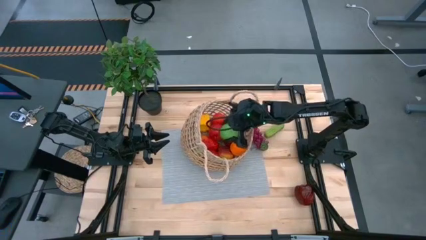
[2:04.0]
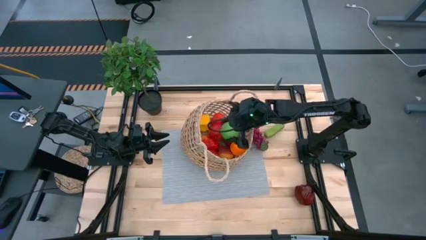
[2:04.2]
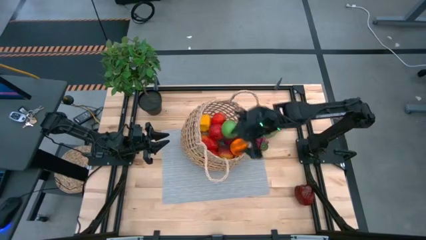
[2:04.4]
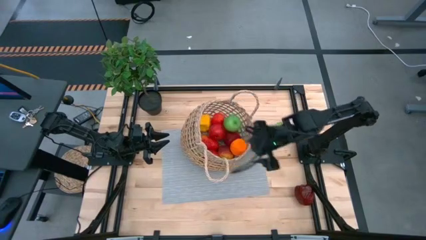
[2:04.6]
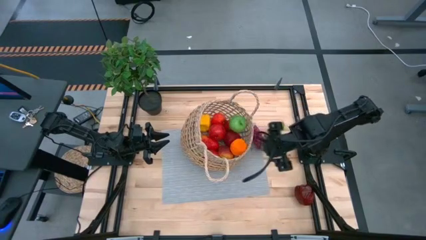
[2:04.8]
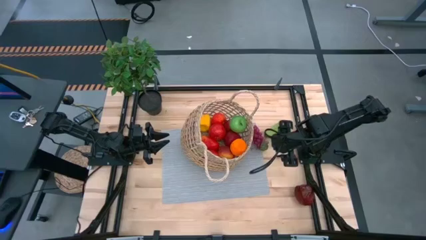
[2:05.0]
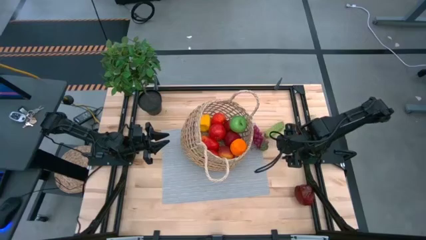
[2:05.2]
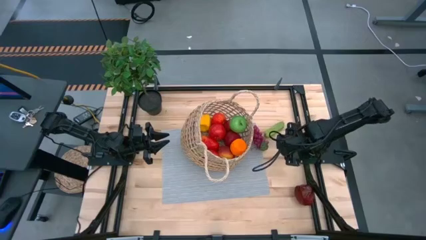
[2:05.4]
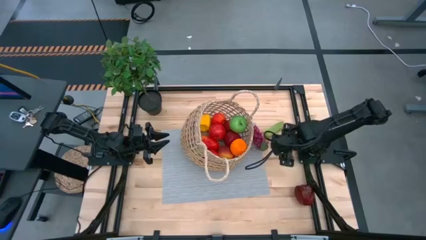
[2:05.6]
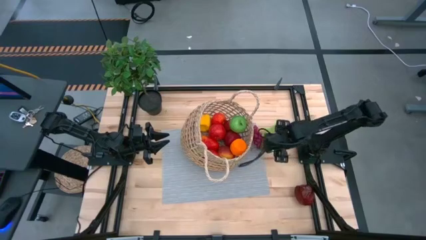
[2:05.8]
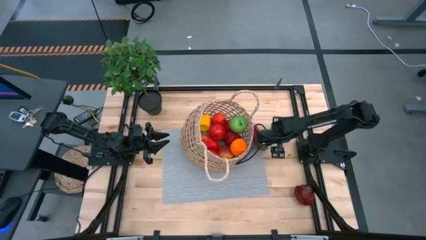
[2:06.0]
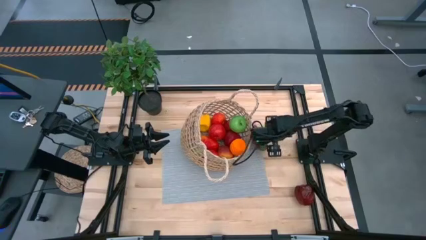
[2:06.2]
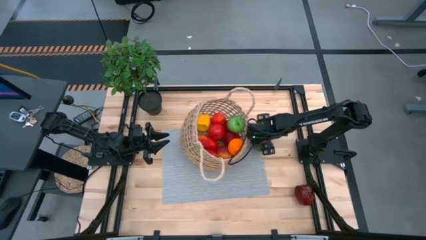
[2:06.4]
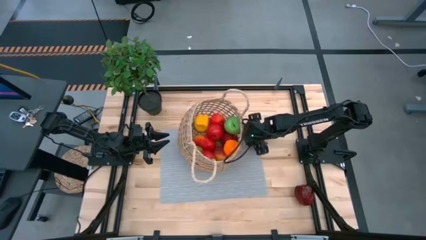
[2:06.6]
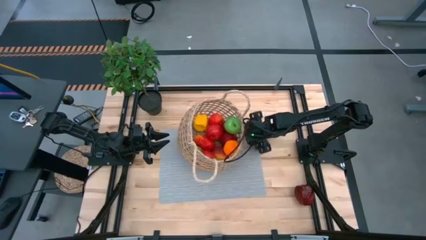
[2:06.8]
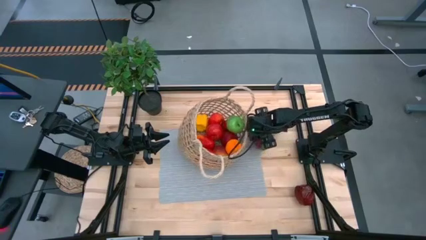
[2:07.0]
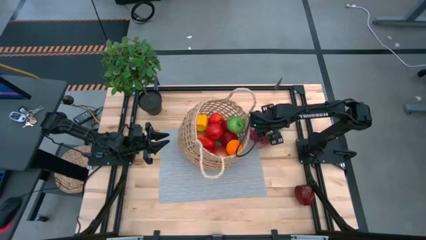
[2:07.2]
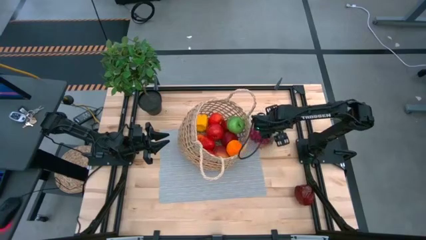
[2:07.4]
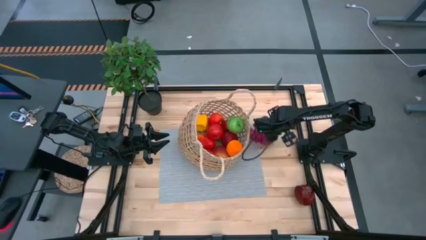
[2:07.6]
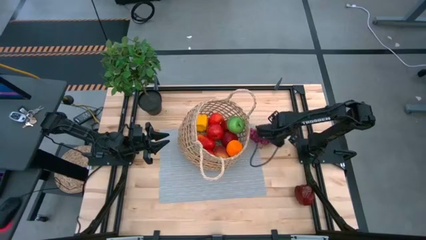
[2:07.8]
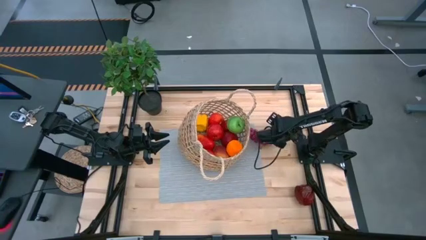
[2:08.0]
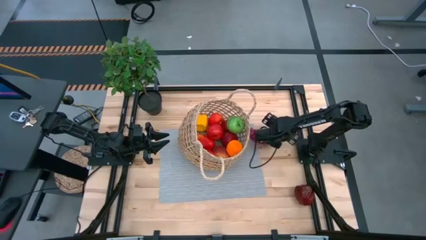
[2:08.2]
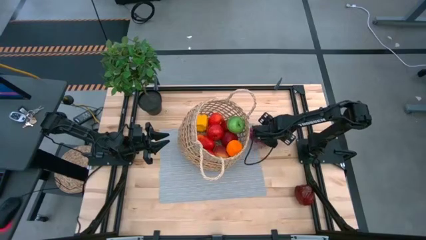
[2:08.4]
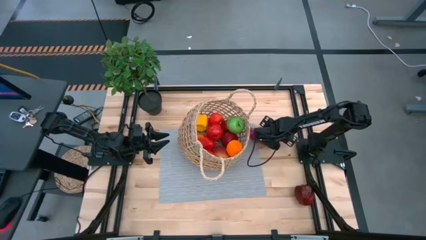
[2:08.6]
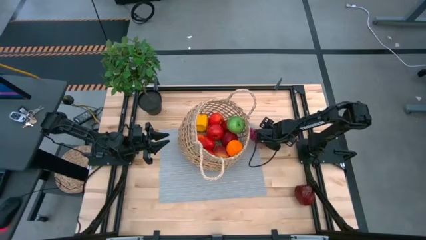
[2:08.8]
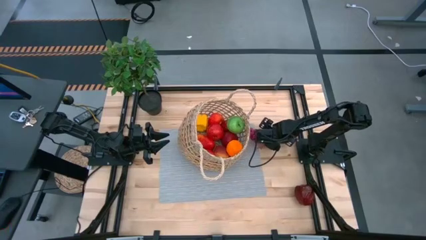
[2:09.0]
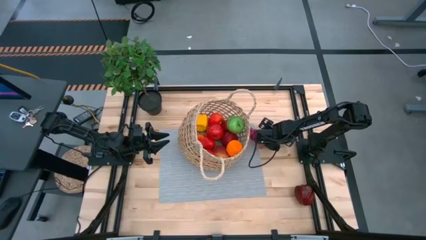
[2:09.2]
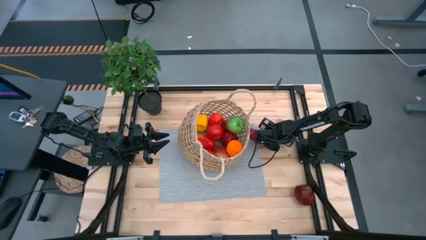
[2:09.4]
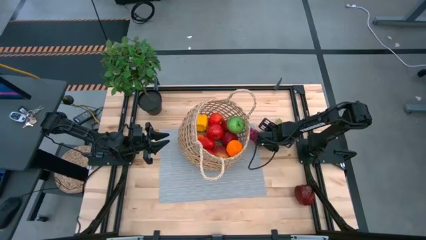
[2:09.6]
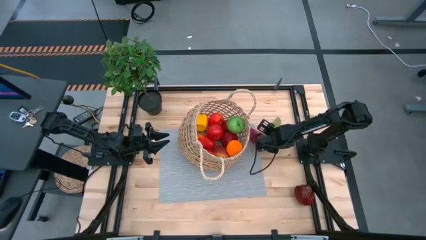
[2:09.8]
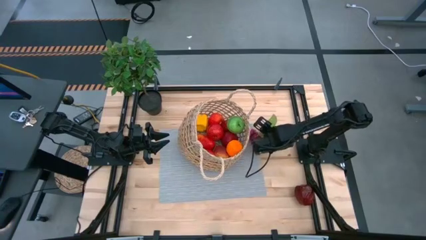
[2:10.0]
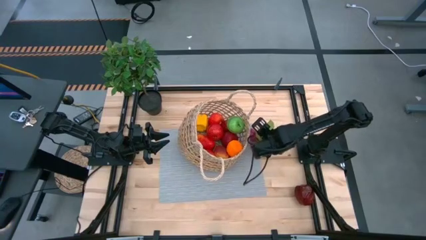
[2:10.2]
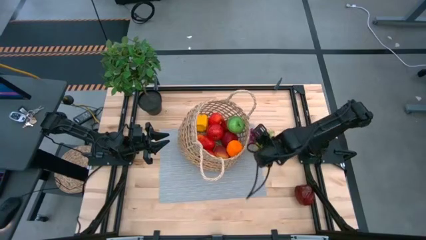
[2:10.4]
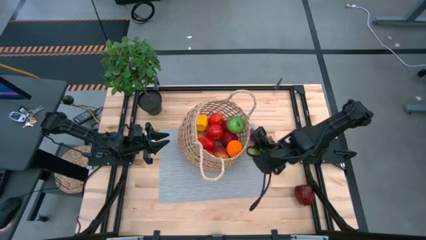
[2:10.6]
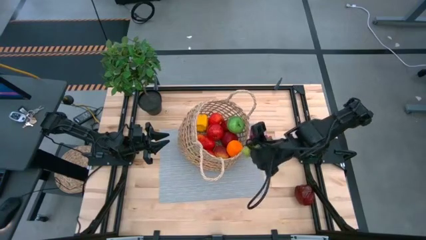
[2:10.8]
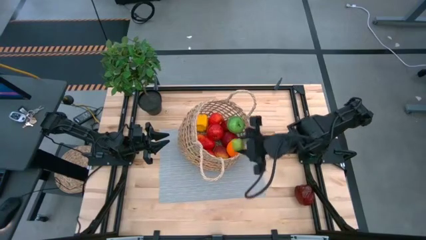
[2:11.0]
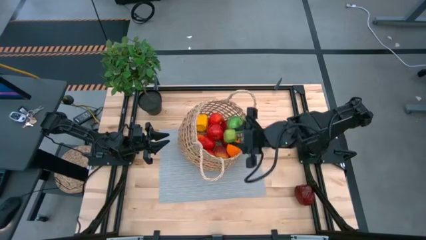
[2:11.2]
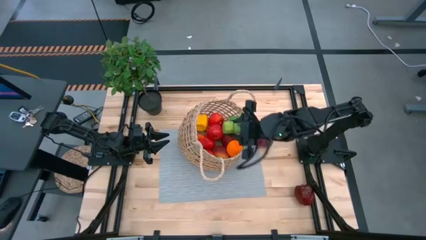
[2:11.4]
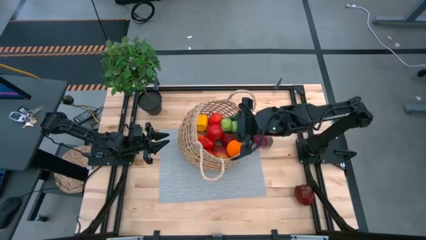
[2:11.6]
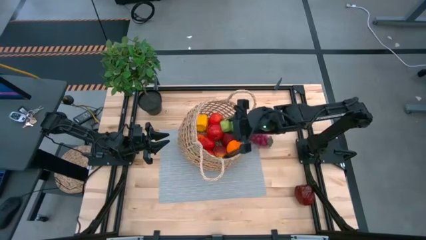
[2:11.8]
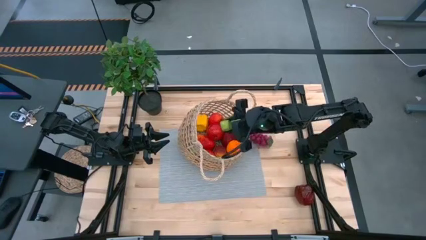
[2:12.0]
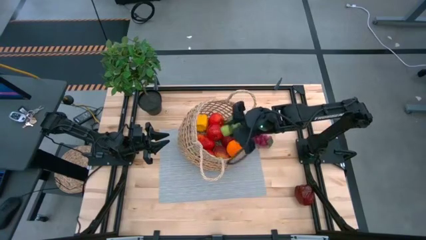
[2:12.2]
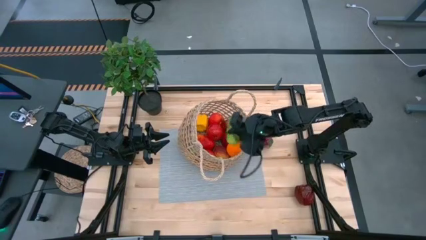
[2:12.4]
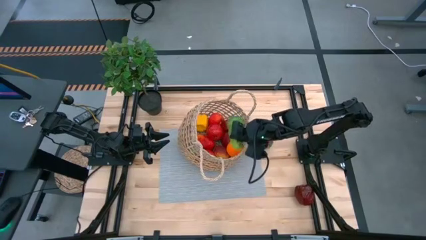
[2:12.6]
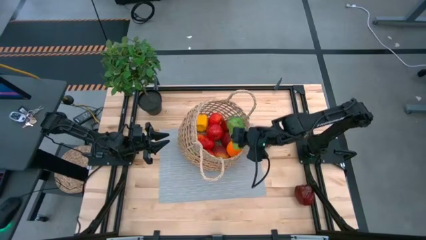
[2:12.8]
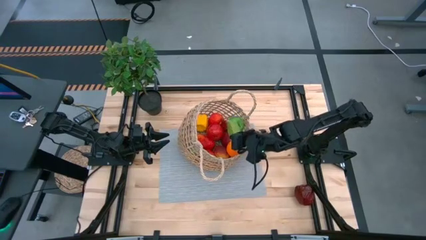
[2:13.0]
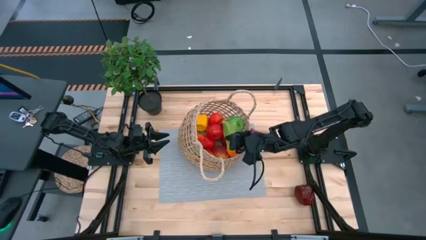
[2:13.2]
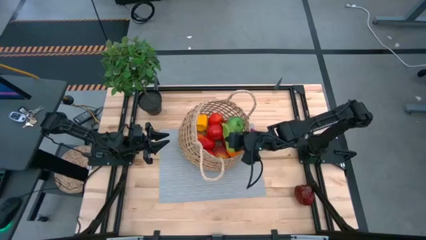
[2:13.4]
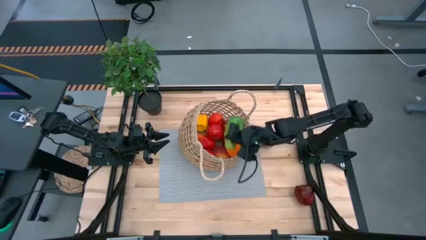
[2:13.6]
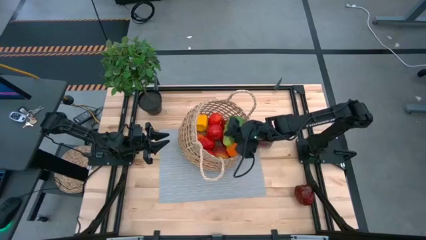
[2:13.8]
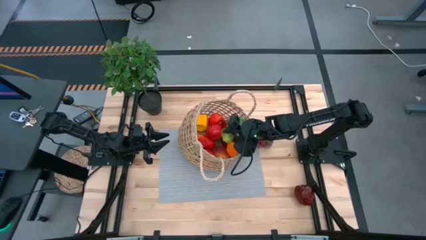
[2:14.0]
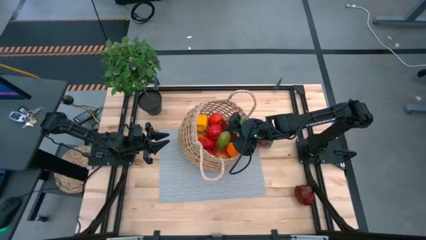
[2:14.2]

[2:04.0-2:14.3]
Task: Build produce basket
Put the green cucumber into the brown basket

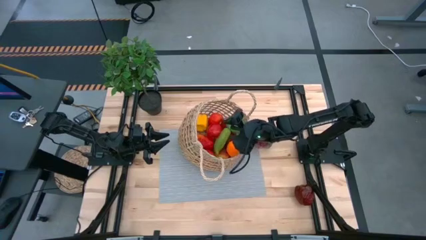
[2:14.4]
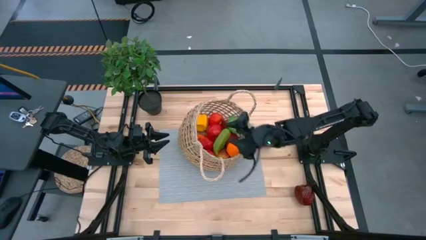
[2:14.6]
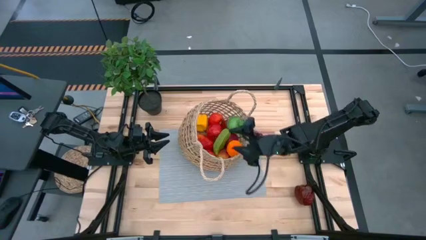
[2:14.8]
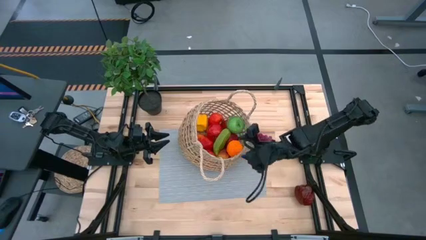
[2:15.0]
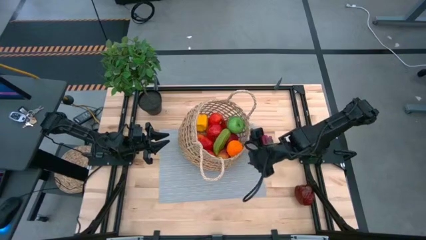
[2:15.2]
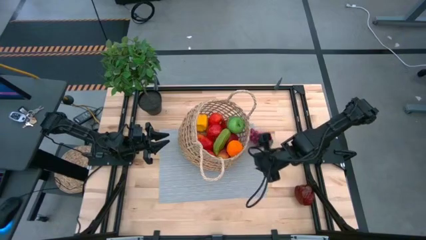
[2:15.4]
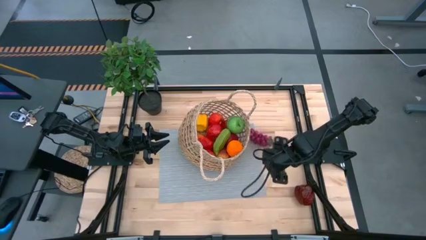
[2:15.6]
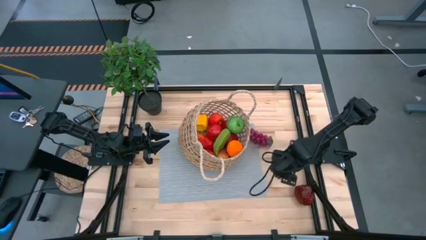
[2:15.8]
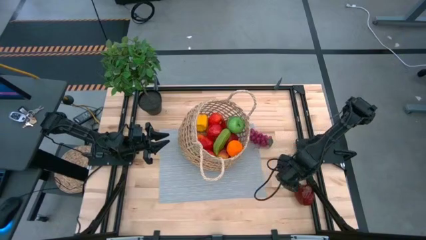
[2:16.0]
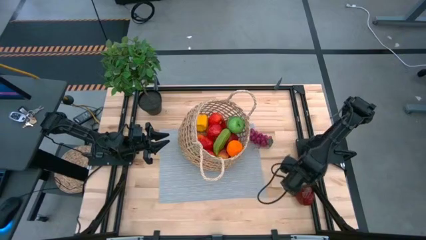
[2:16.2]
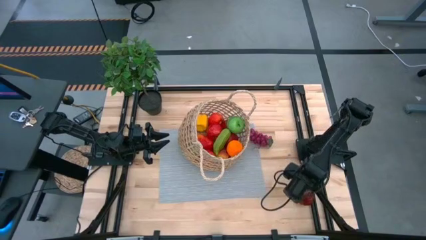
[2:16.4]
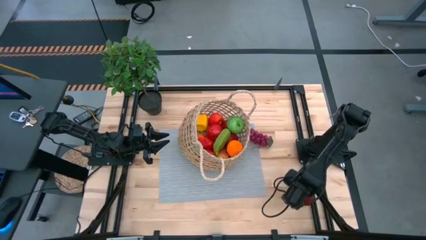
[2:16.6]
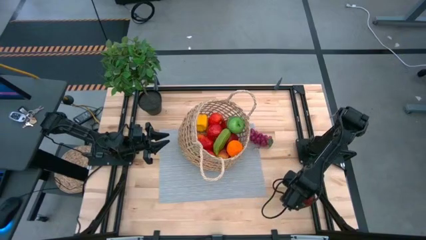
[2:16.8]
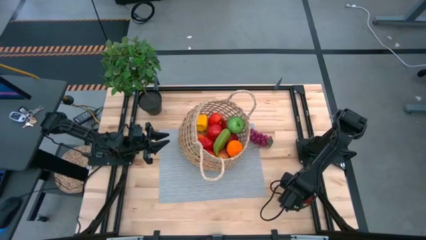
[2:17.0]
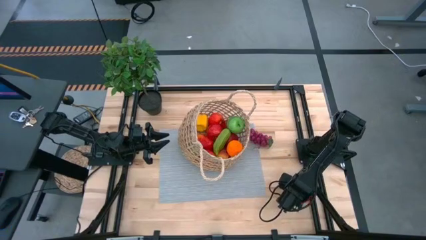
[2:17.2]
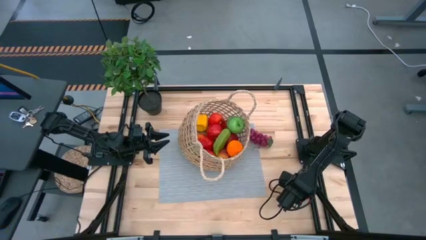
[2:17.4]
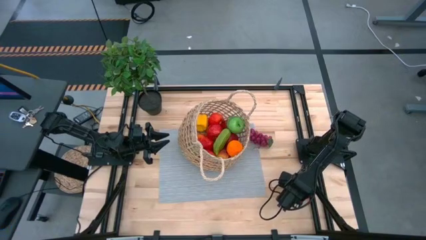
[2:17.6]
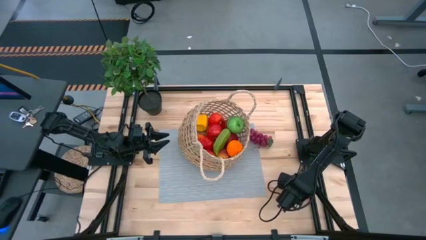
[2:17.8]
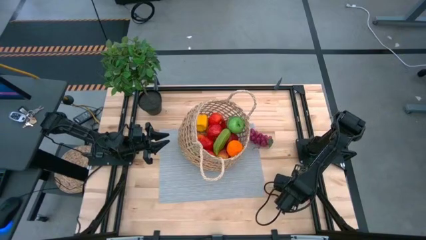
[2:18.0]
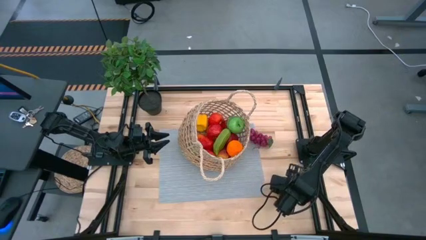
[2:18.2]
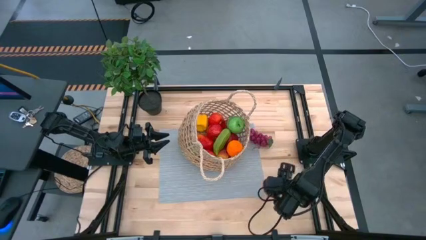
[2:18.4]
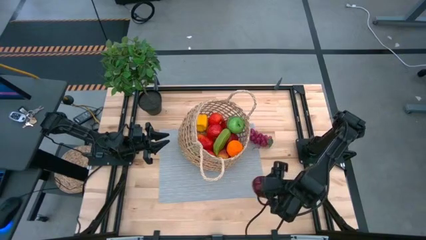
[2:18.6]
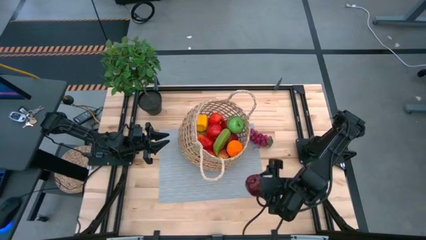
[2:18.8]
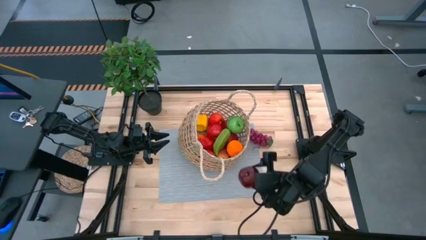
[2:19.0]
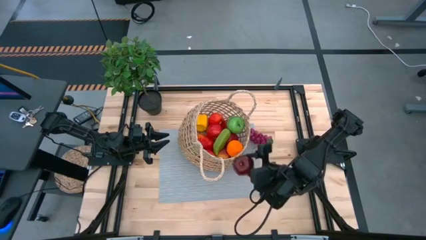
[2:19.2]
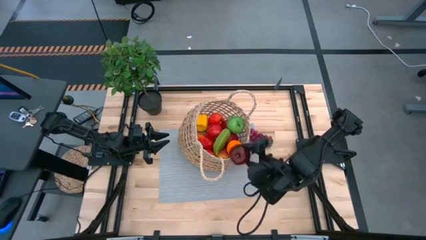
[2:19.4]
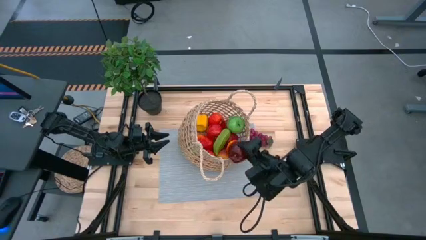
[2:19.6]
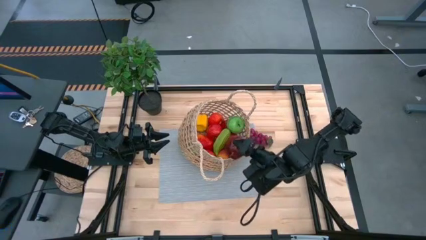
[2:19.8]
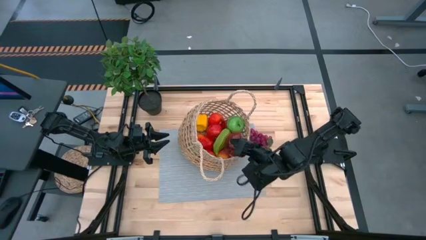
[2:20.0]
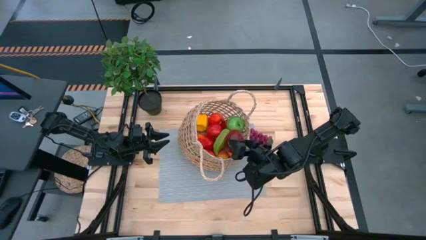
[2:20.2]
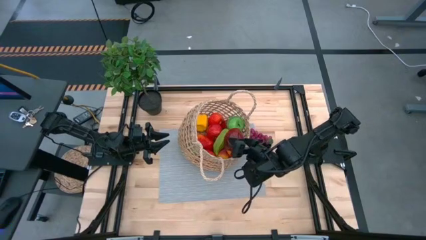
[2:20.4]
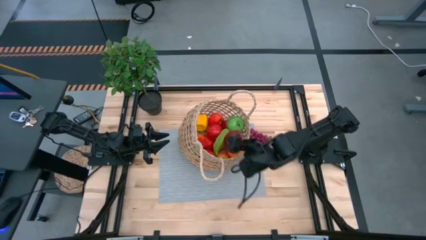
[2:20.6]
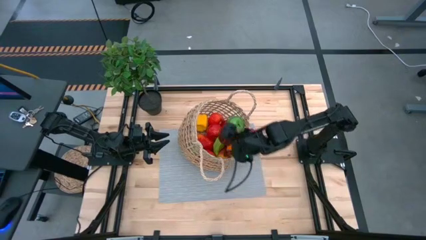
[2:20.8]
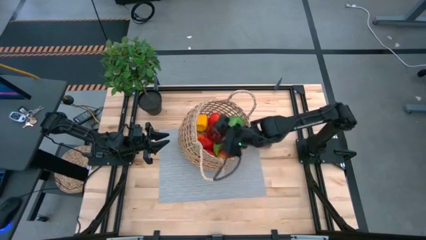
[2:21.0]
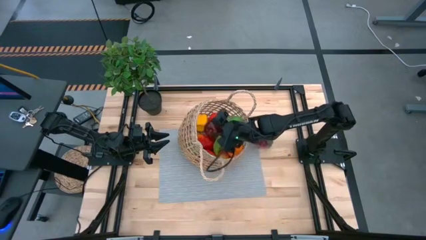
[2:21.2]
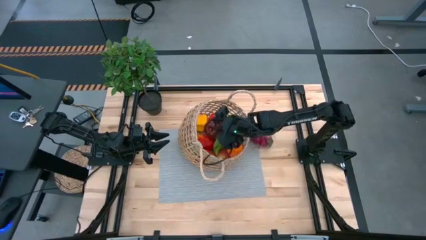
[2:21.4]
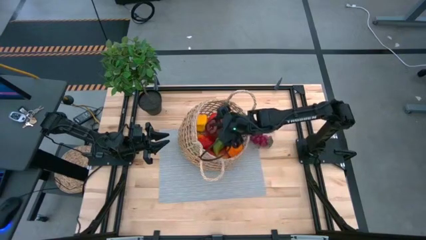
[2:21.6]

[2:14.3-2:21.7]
Put the red apple into the brown basket
